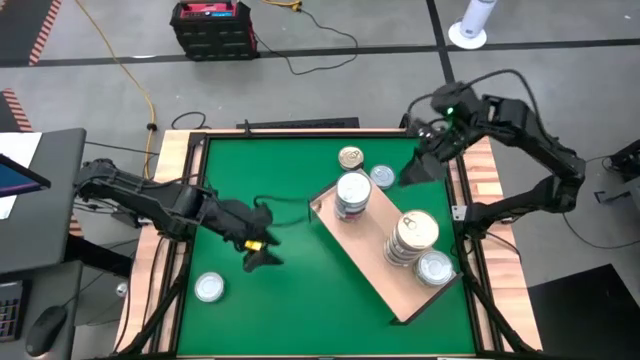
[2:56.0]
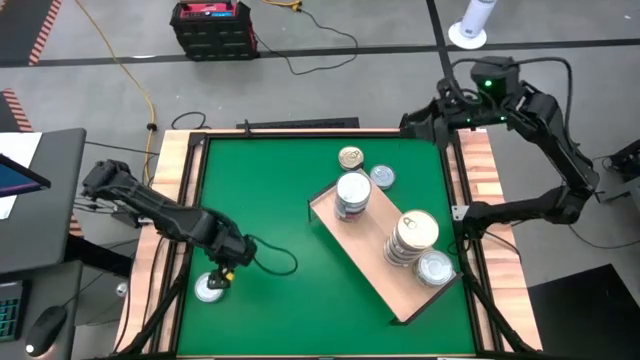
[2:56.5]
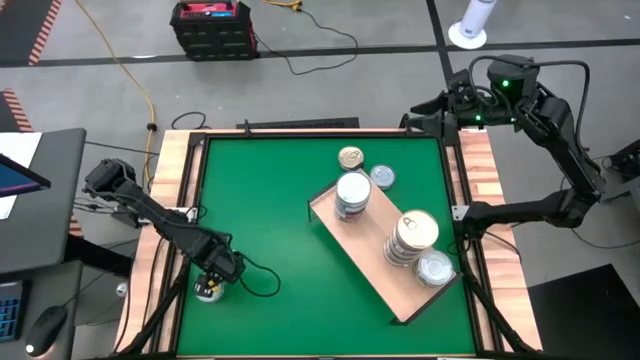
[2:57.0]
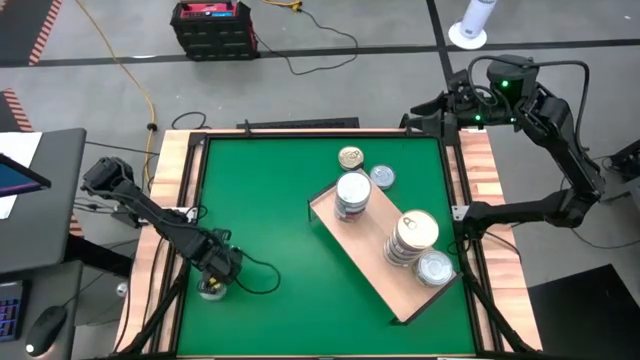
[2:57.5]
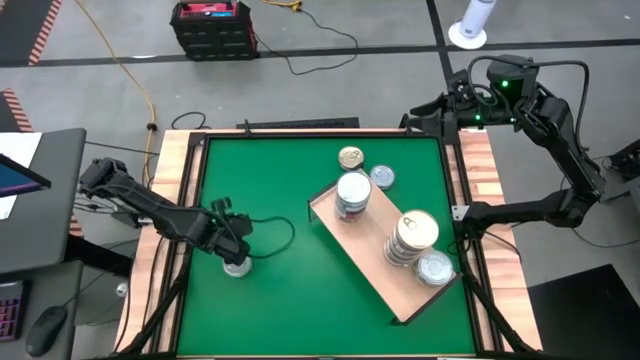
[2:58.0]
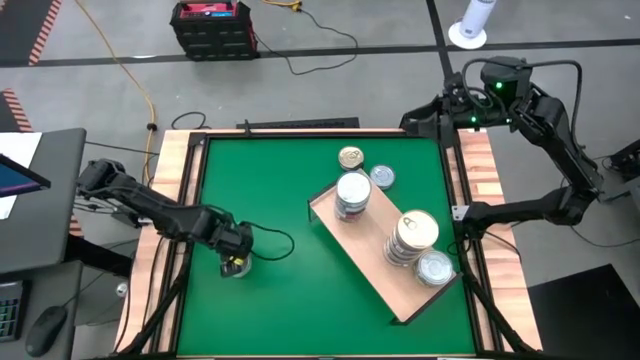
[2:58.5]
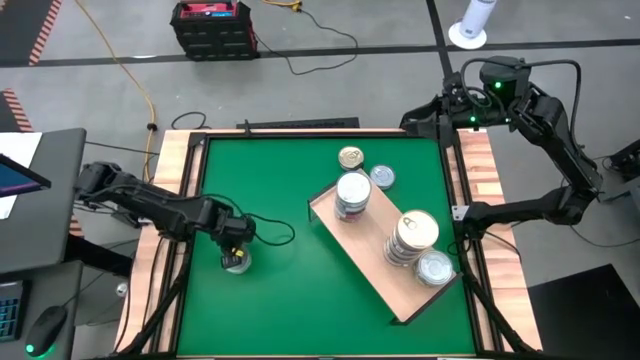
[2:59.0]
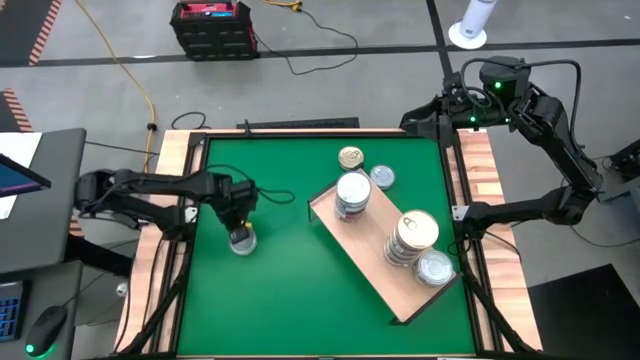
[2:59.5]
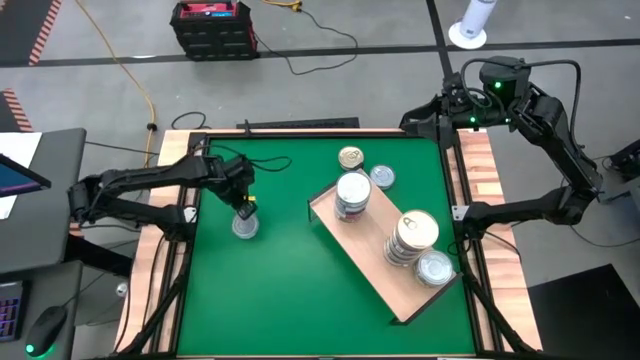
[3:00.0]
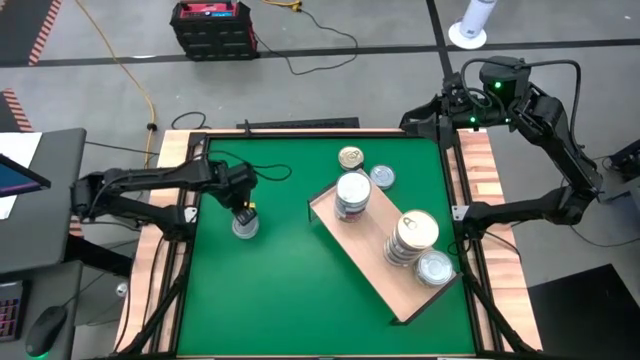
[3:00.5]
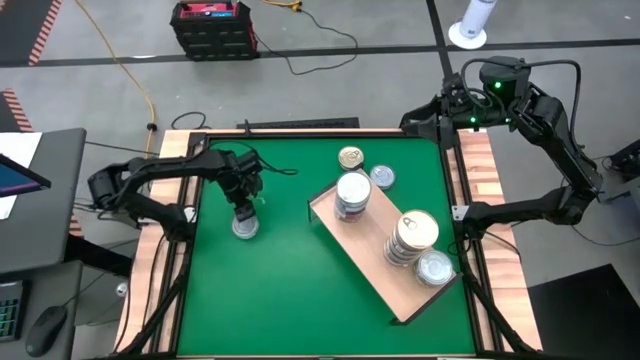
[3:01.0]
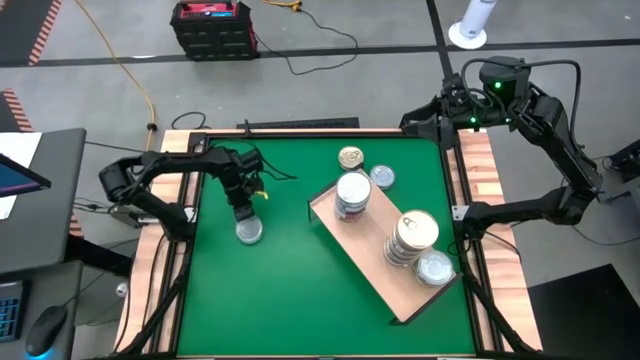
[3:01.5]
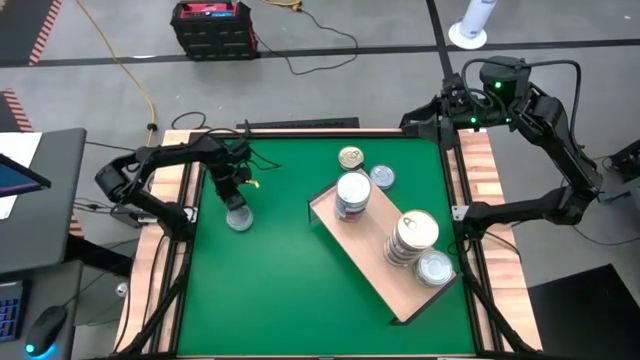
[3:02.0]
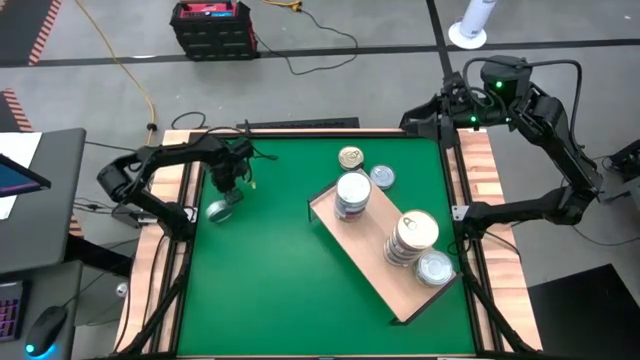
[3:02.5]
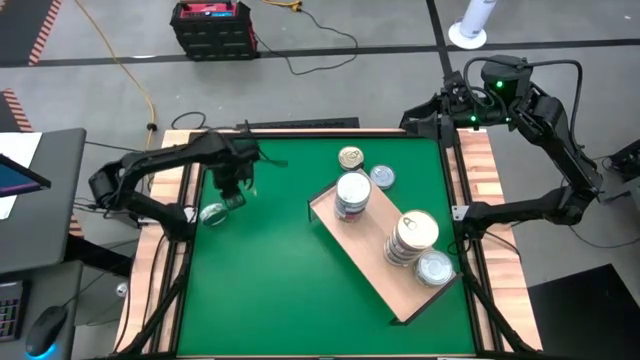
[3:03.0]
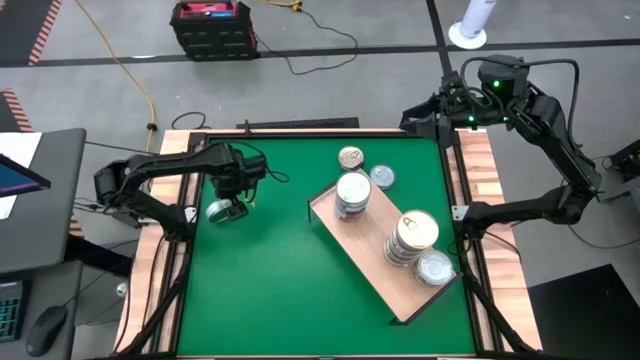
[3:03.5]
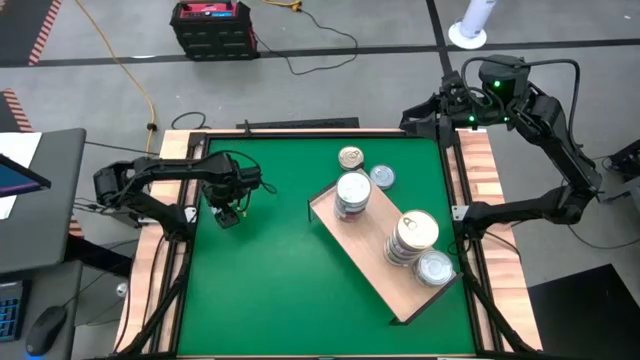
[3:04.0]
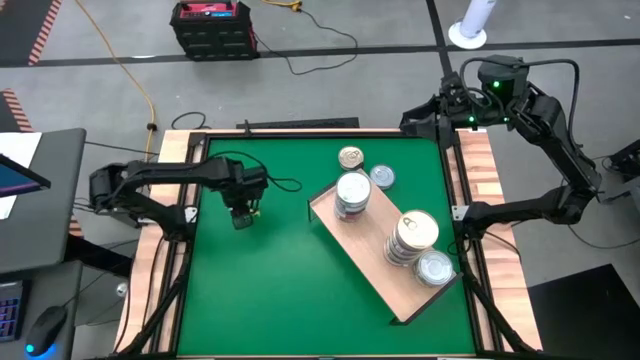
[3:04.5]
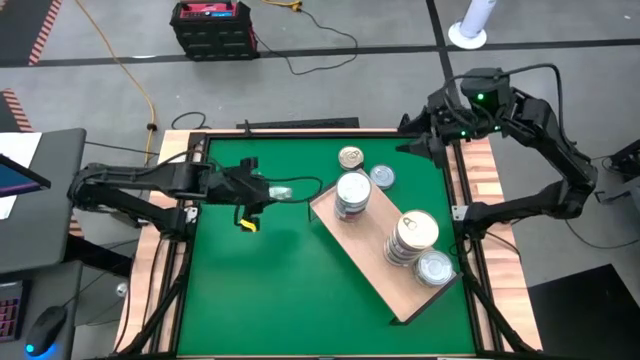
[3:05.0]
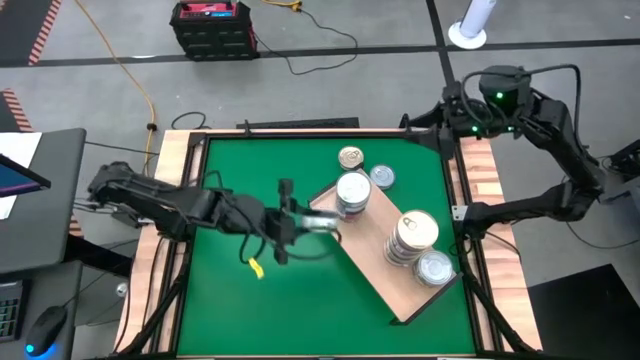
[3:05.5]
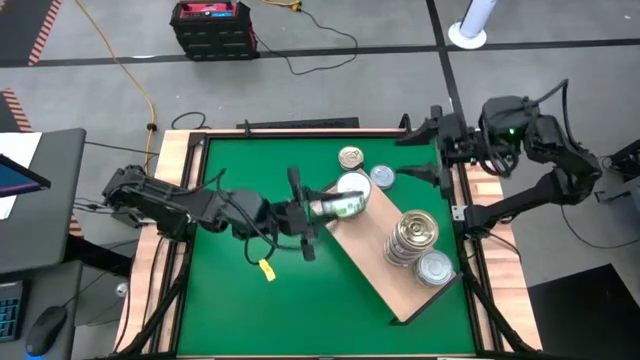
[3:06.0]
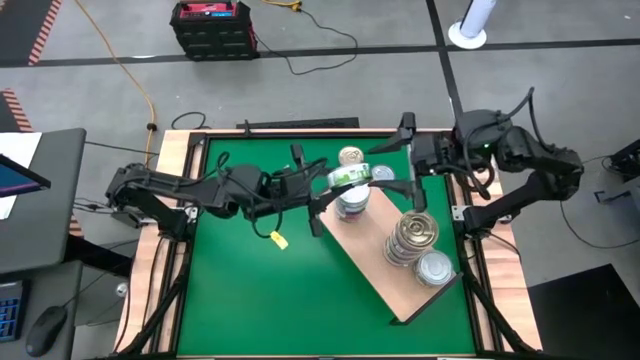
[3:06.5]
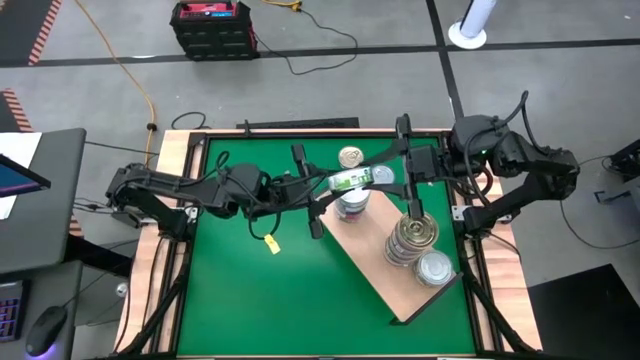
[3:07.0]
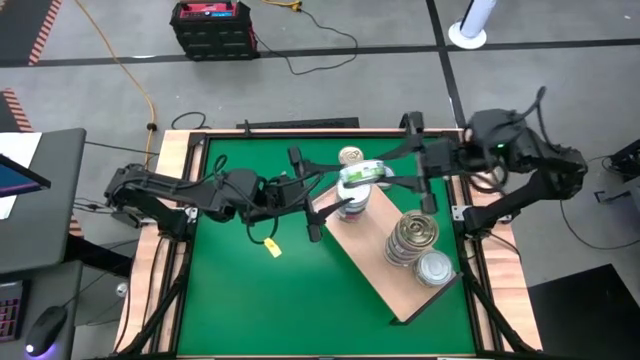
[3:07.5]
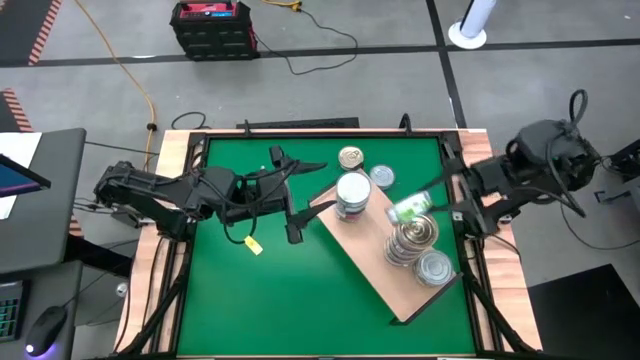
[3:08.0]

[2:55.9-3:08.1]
Task: Stack canned seafood by type on shelf
Stack the light green tuna can on top of the other light green tuna cans on the shelf

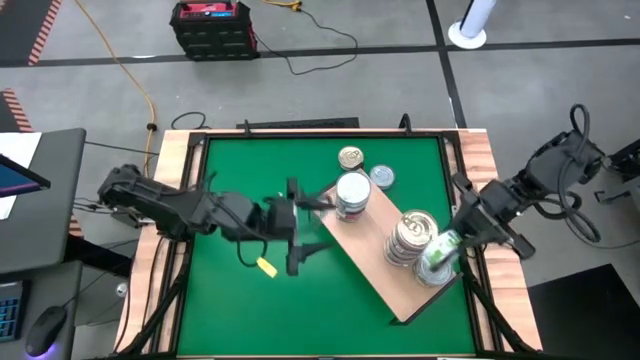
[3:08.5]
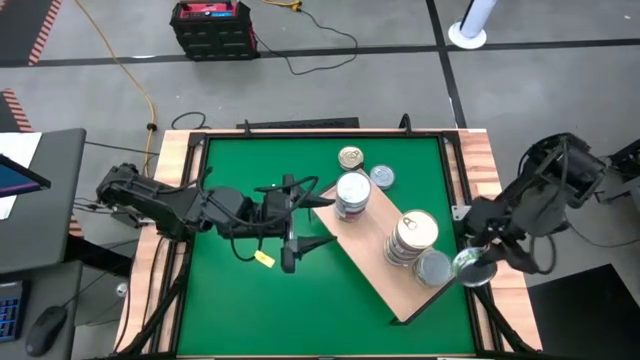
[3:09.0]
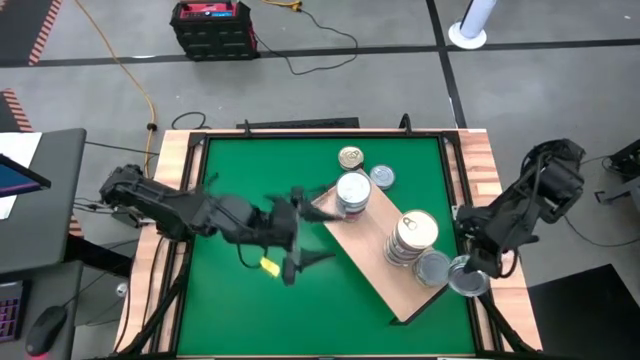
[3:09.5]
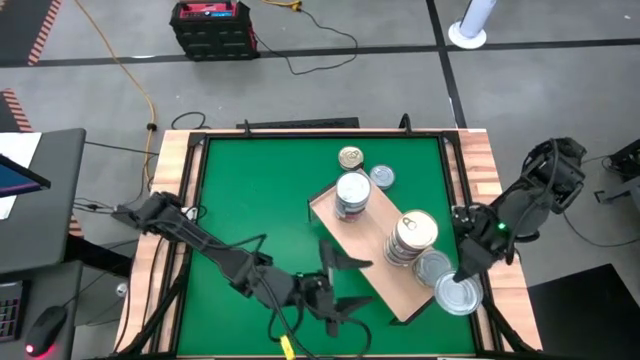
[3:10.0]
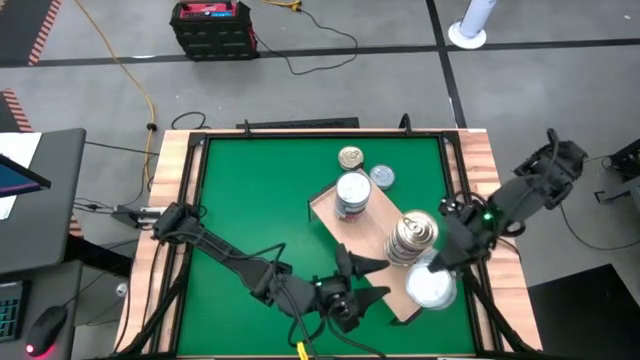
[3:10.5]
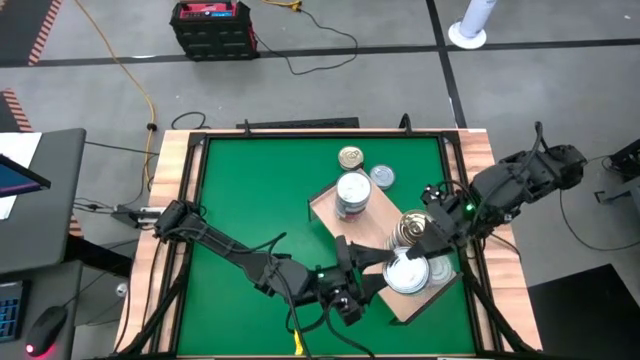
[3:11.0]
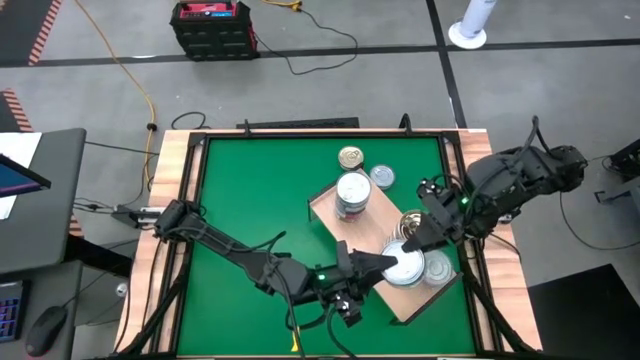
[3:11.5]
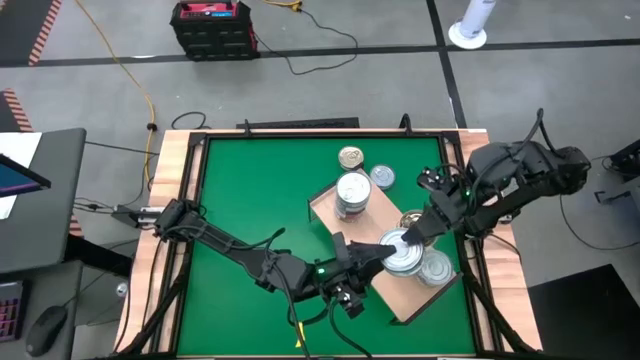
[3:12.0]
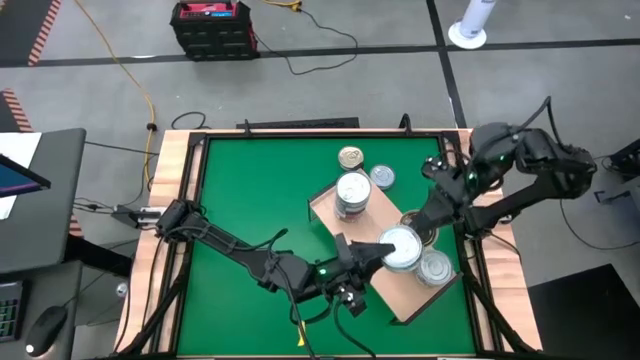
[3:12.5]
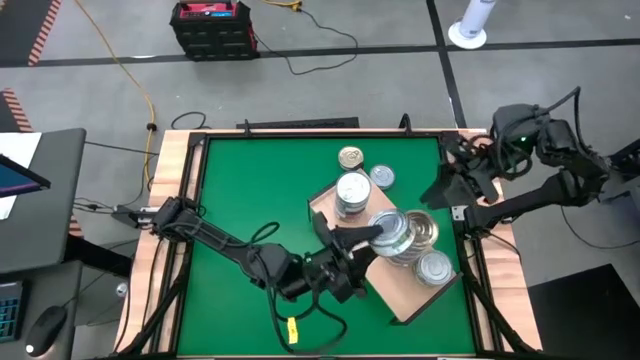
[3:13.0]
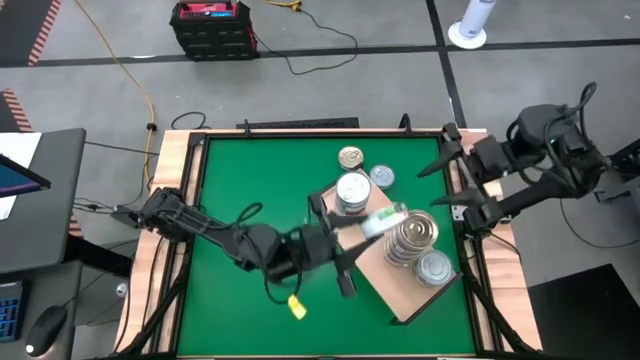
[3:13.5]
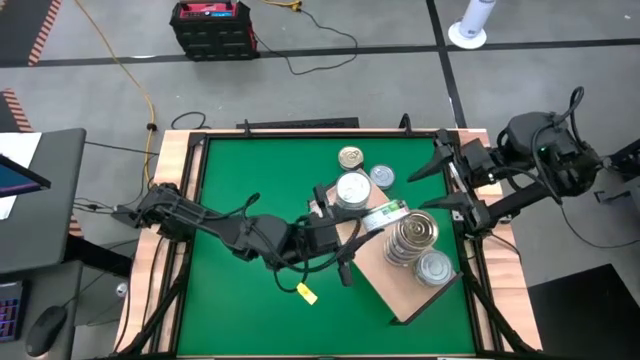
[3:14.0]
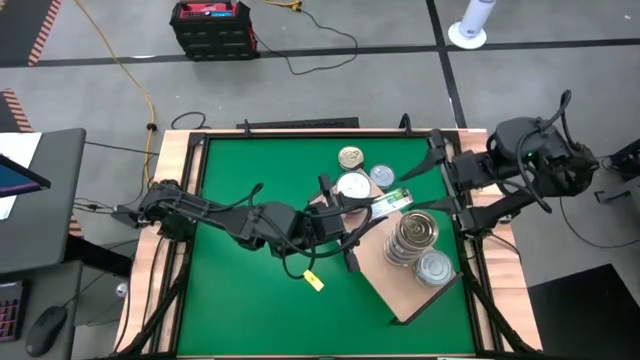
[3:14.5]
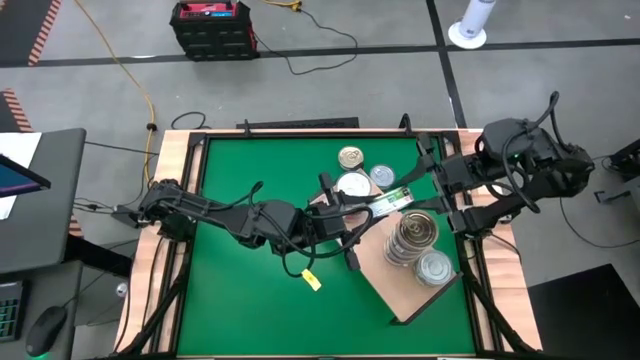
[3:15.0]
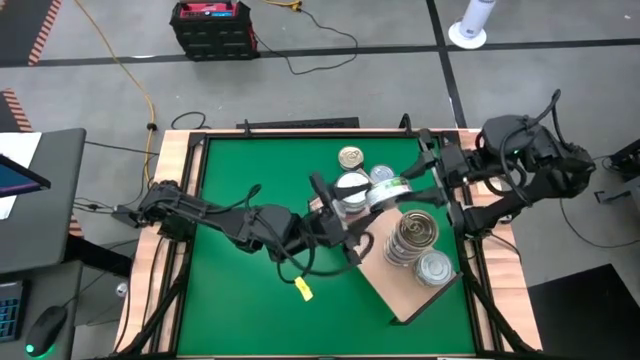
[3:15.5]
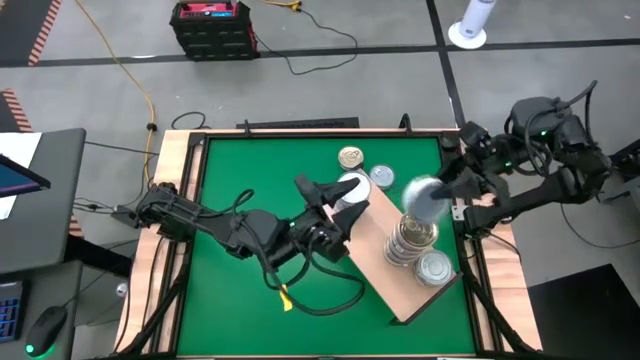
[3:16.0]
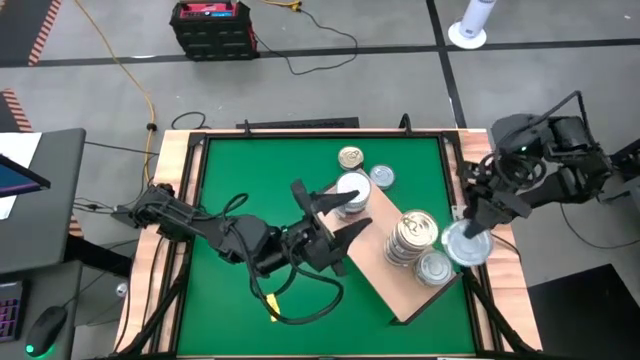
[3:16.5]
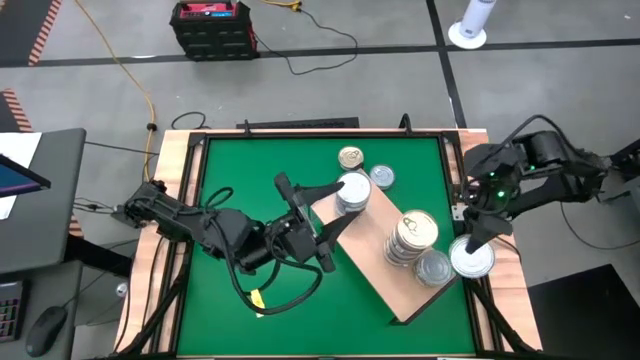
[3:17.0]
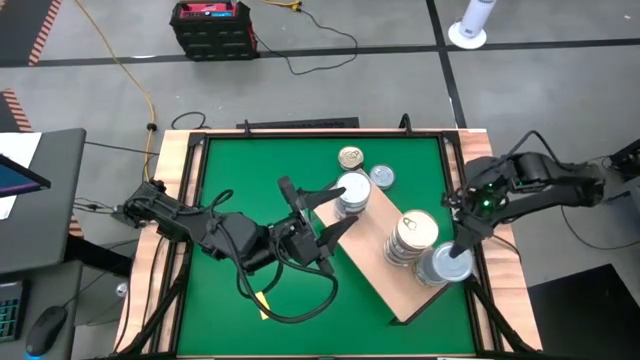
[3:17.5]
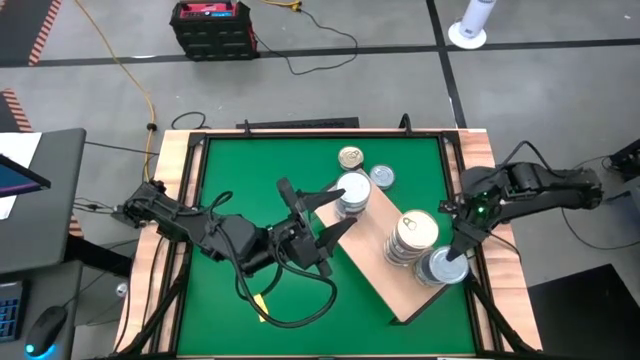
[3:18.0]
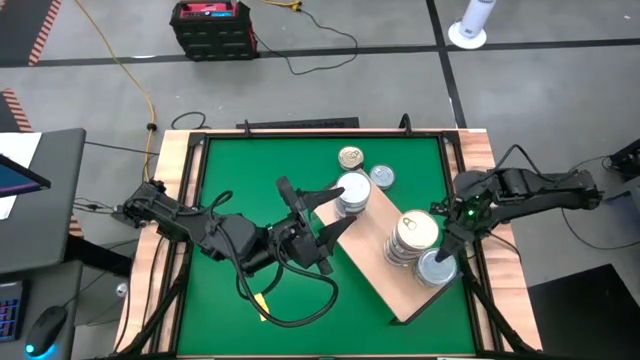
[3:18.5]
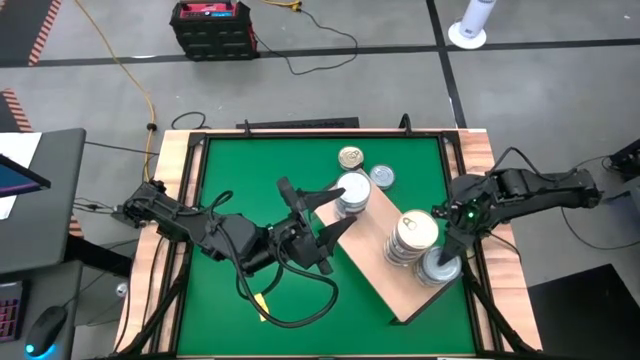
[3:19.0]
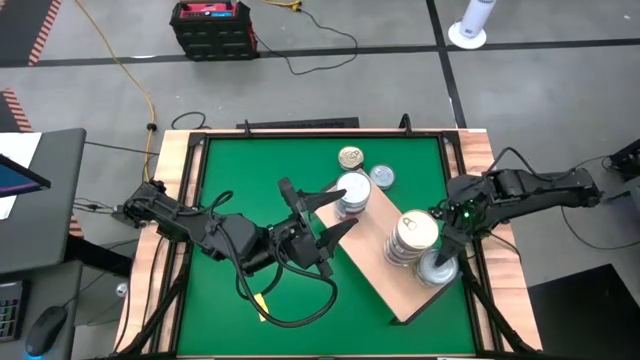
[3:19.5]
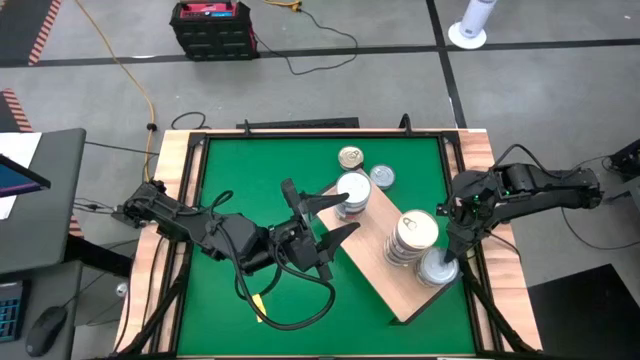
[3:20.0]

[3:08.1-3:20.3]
Stack the light green tuna can on top of the other light green tuna cans on the shelf
